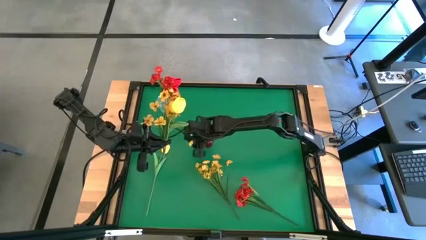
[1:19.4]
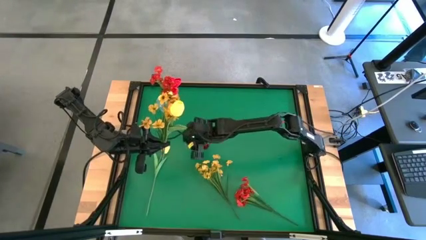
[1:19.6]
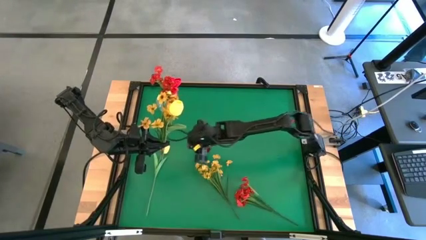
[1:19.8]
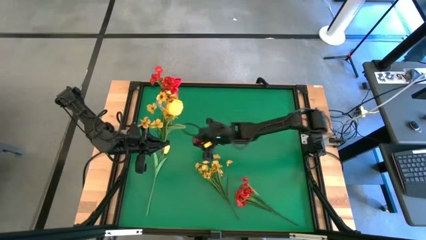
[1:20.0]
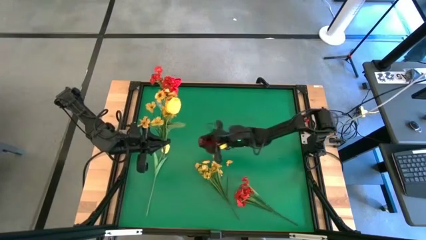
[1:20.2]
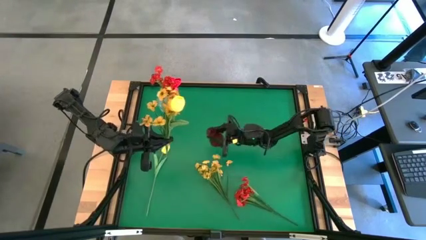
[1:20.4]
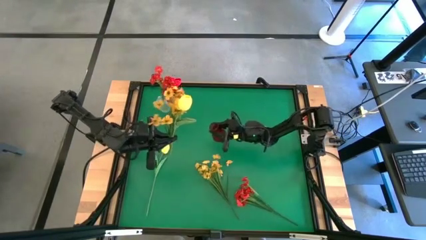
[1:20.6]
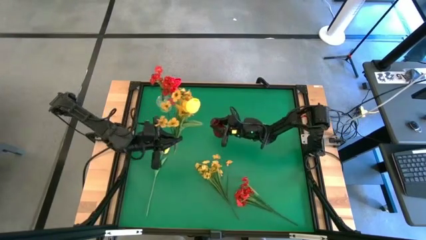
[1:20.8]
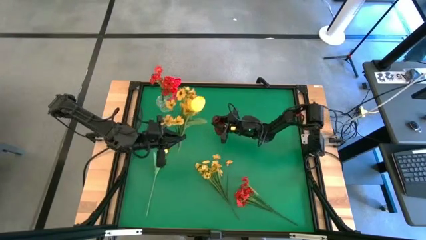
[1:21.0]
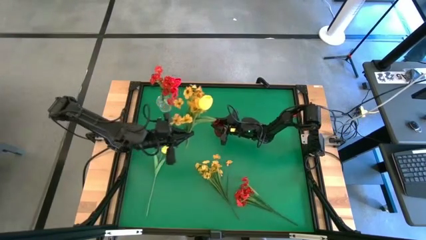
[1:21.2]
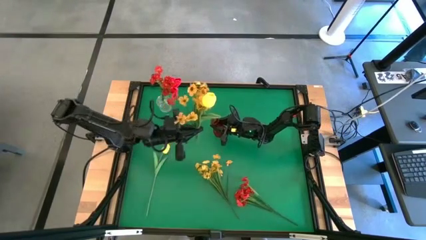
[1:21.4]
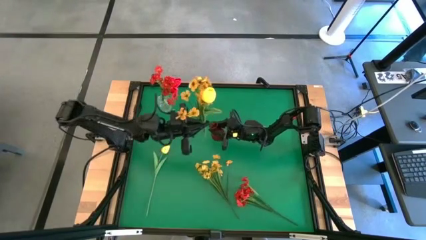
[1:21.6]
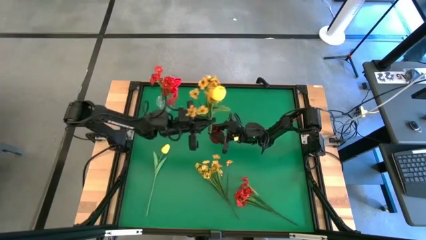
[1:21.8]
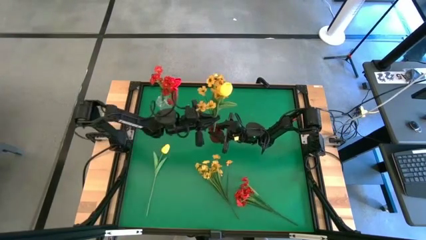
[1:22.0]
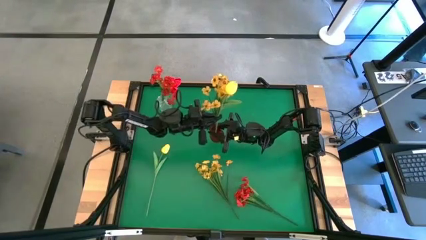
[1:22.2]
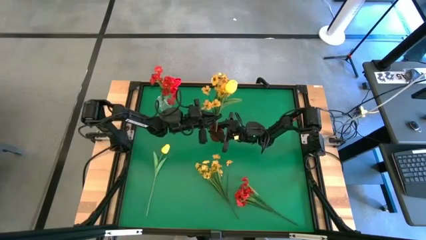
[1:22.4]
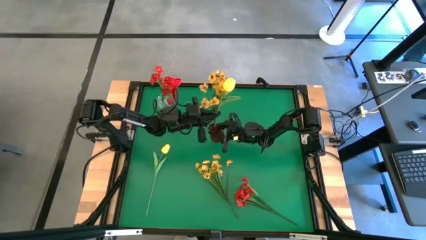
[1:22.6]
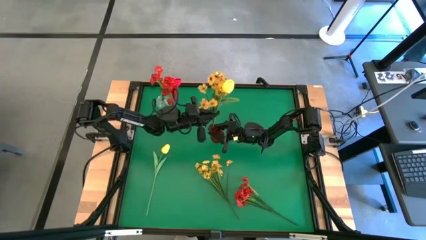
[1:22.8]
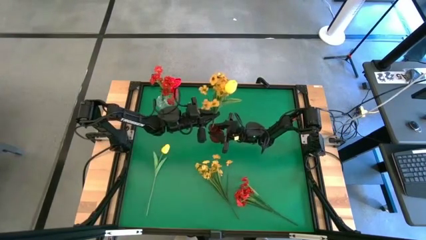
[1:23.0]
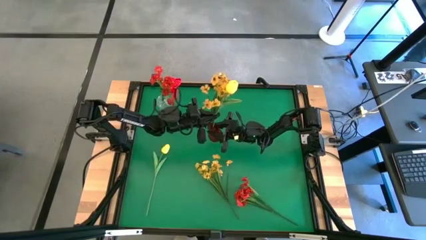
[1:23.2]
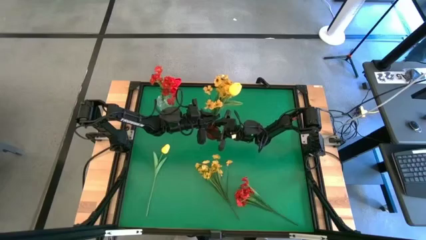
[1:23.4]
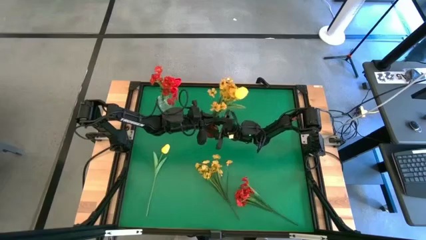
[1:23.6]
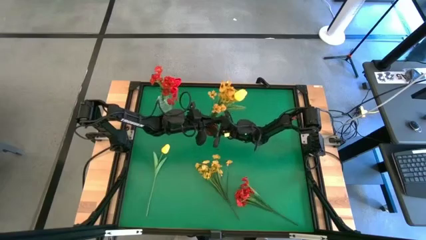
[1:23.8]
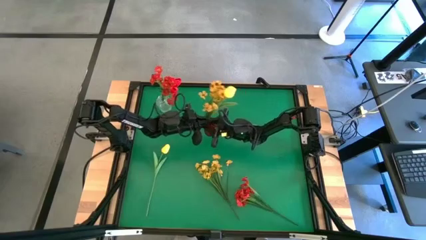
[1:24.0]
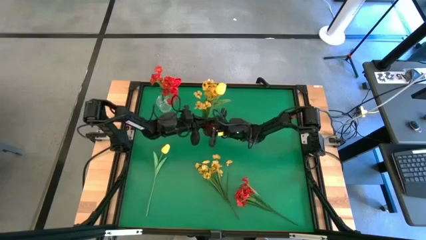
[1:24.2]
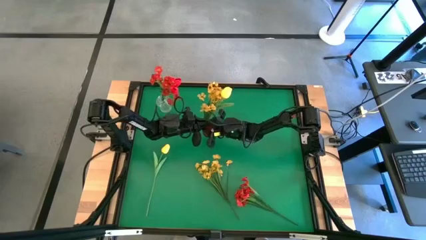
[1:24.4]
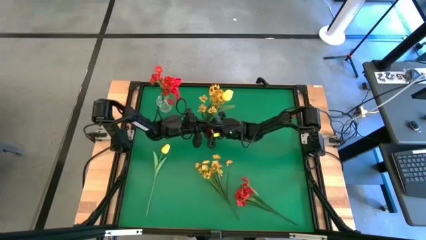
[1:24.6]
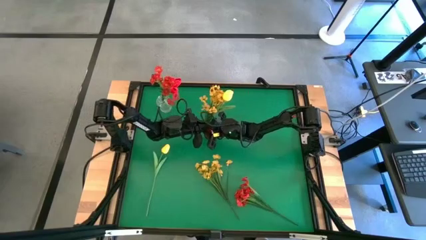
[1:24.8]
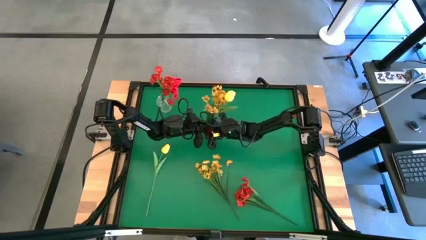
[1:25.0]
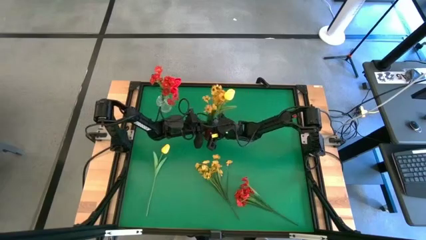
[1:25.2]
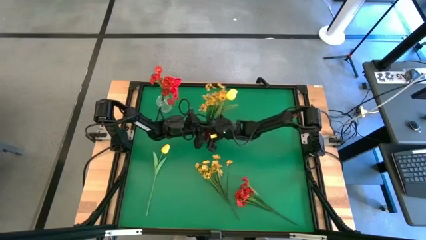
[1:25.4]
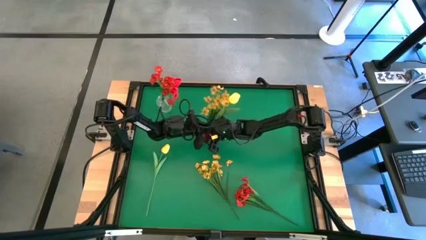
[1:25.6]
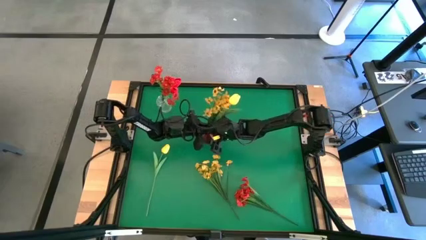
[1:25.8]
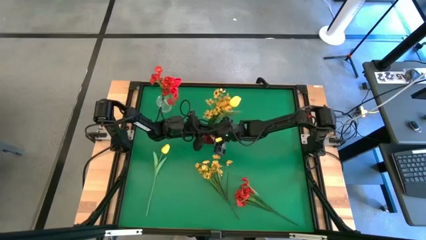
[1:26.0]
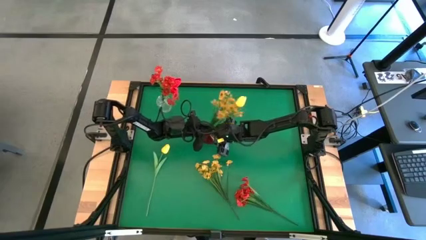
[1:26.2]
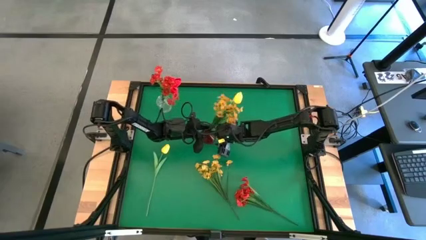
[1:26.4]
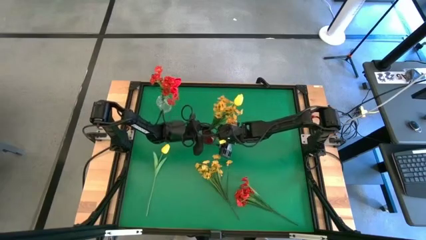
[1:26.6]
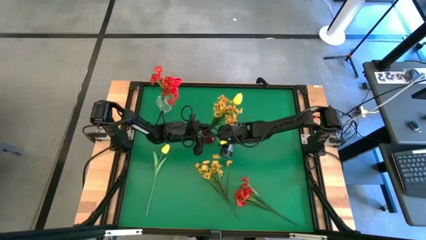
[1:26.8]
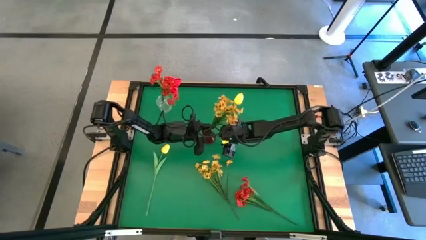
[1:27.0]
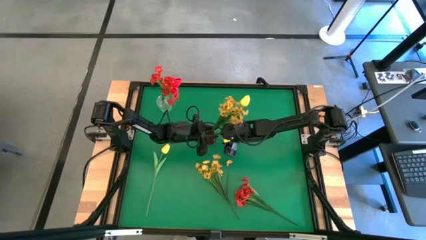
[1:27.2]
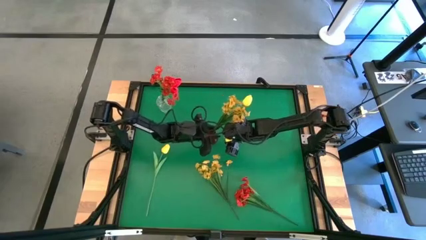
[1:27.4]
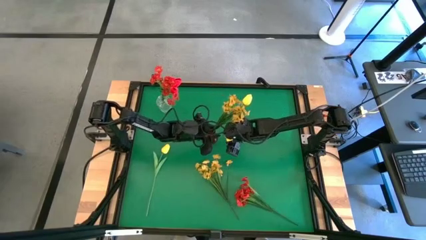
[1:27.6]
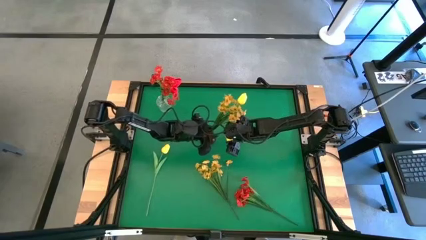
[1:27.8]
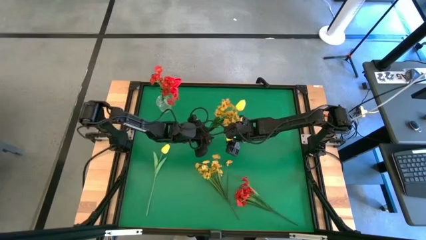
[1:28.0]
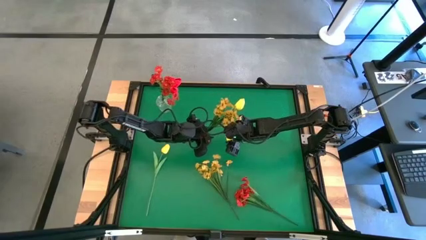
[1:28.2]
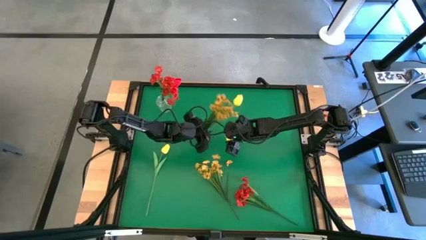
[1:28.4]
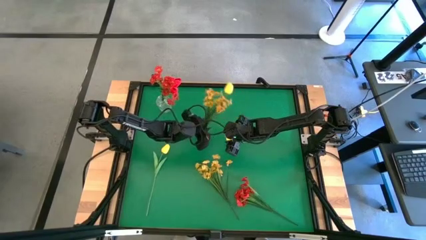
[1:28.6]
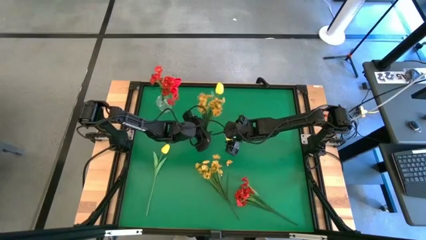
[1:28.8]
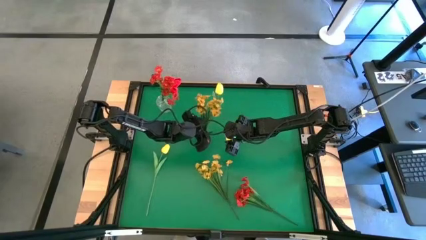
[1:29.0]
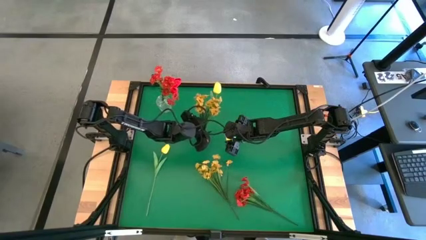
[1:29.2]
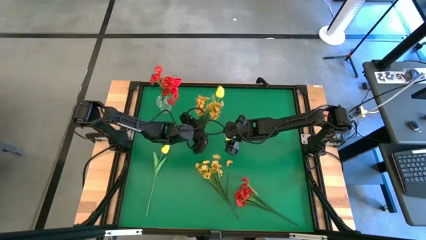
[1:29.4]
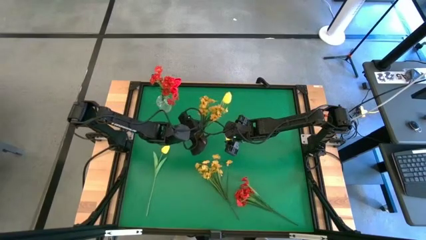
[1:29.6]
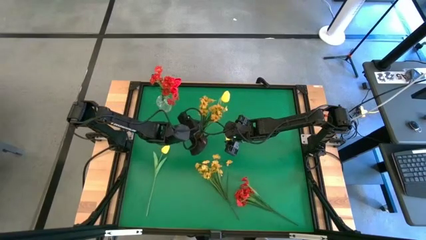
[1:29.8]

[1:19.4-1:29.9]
Task: Sort flowers into vase by color
Put the red vase containing the yellow flowers on the center of the table upright

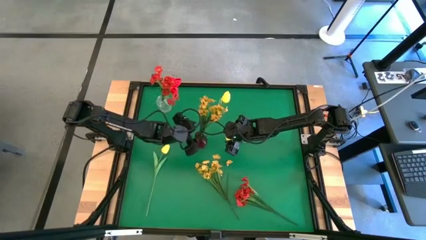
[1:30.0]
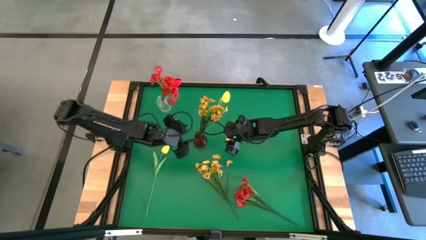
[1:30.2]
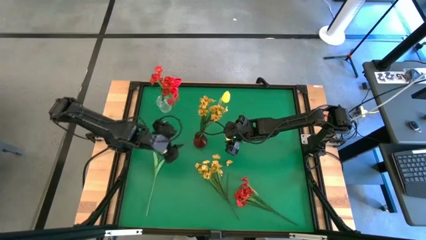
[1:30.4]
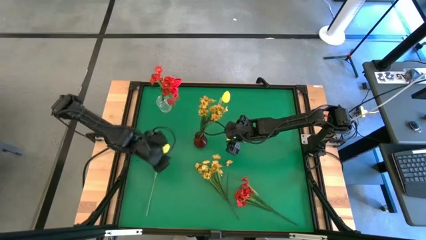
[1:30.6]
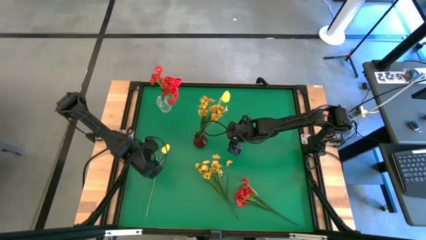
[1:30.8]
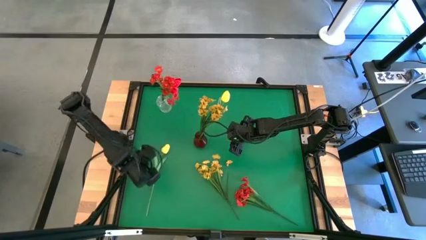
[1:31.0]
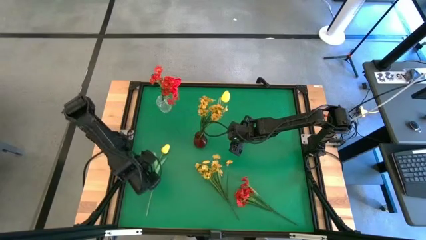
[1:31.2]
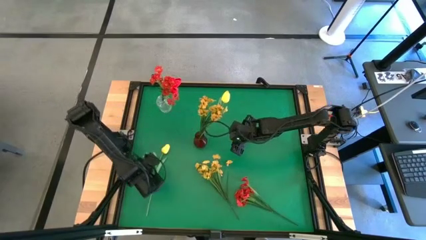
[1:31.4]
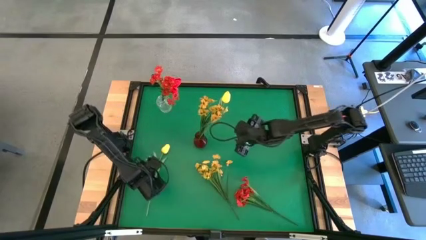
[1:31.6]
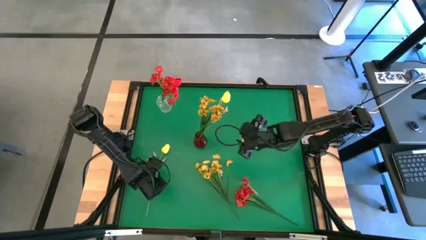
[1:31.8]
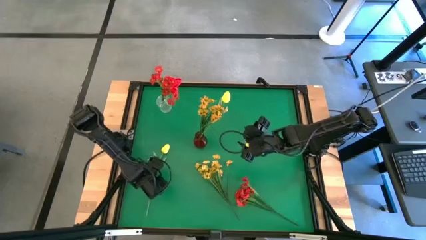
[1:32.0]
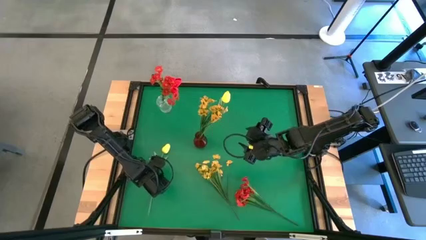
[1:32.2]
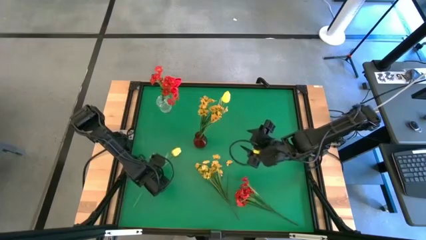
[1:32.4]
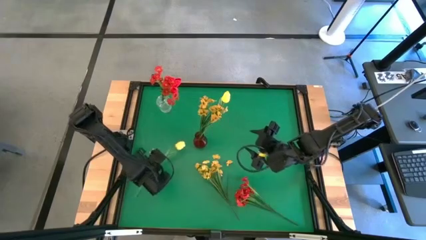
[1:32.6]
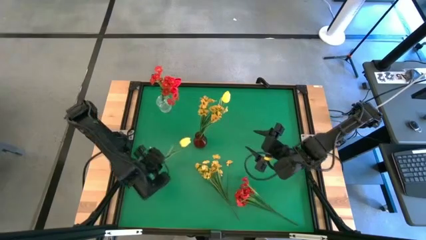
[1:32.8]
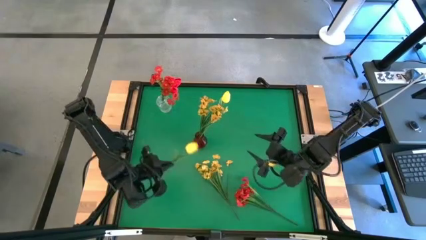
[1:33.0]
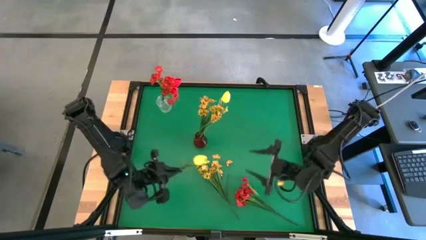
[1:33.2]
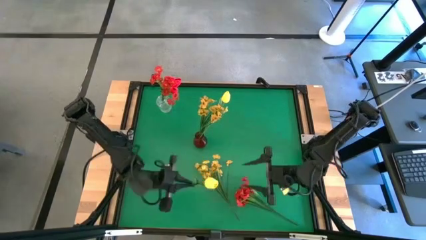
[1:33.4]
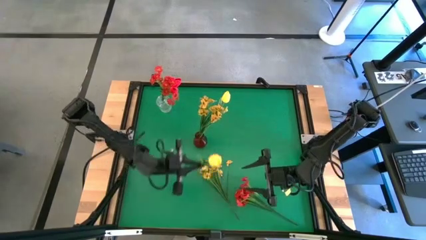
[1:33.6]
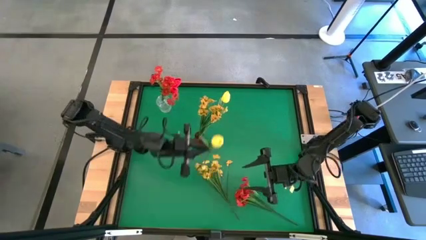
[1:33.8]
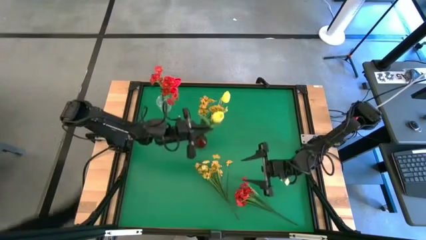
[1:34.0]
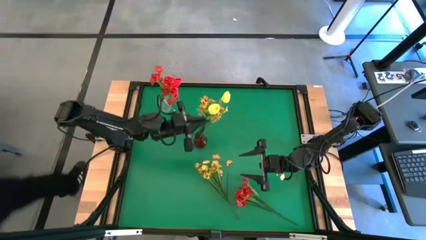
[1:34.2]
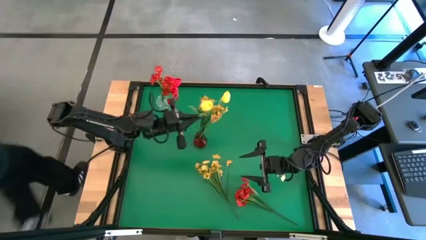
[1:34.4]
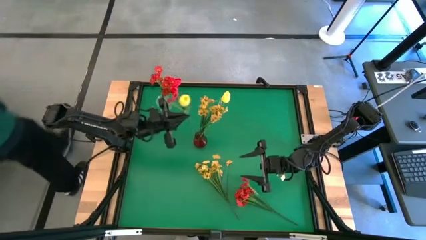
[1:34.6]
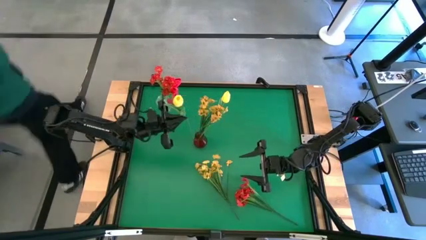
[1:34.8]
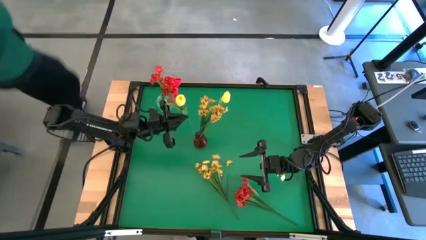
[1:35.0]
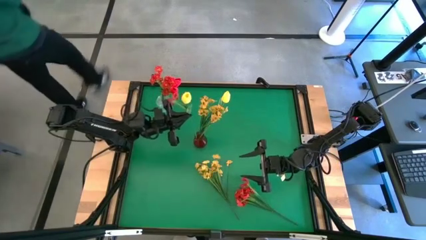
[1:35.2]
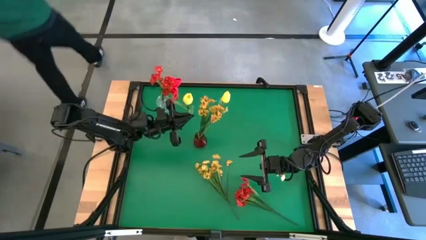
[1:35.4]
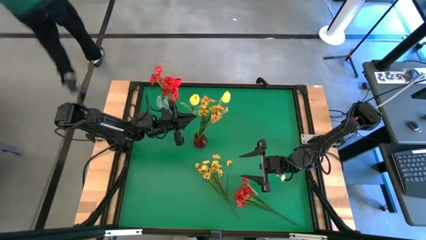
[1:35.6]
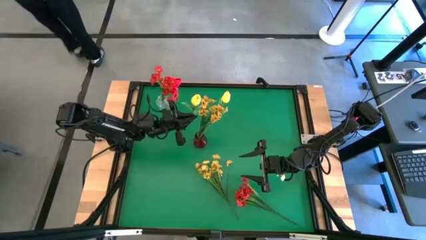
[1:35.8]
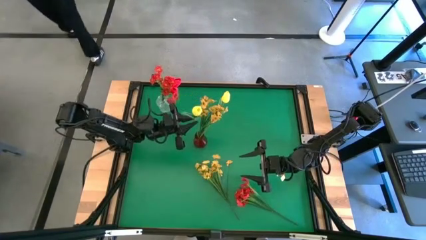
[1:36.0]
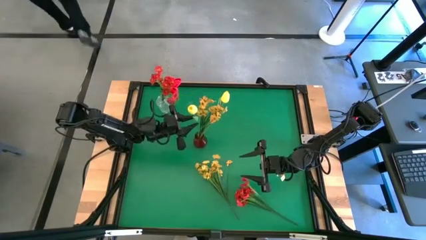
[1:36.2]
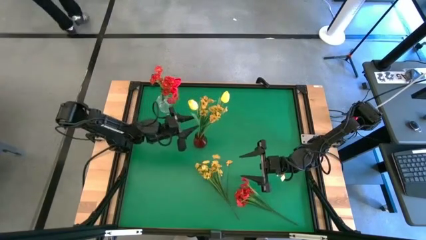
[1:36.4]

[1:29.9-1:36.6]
Put the yellow flower into the red vase

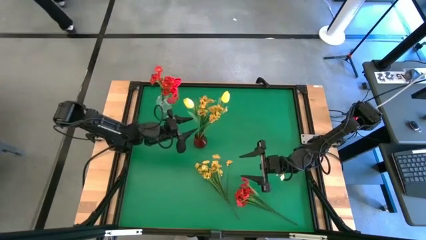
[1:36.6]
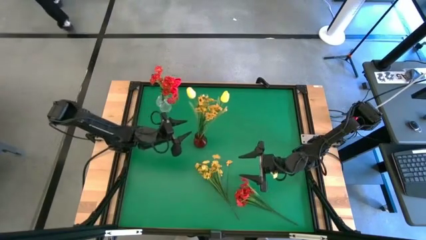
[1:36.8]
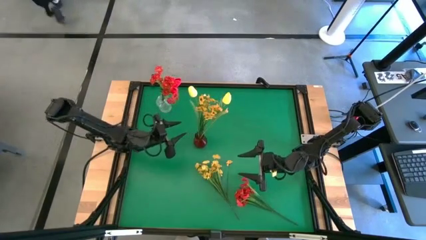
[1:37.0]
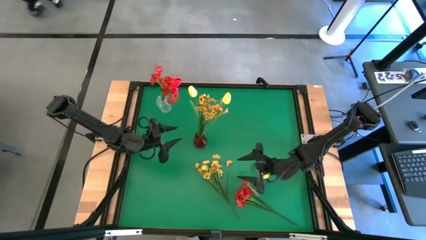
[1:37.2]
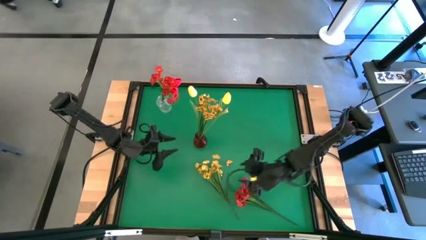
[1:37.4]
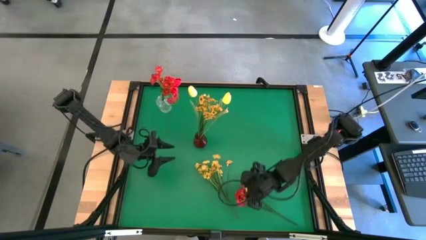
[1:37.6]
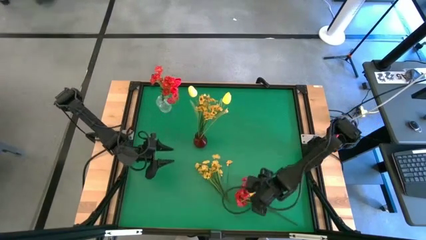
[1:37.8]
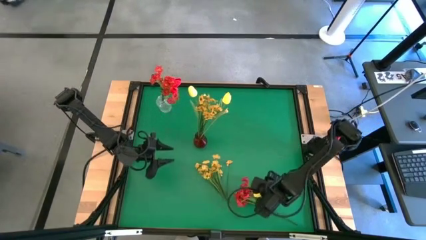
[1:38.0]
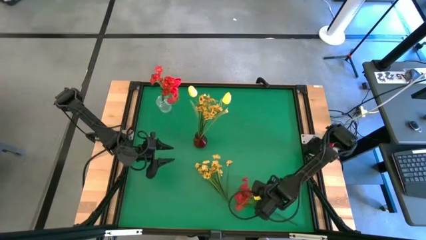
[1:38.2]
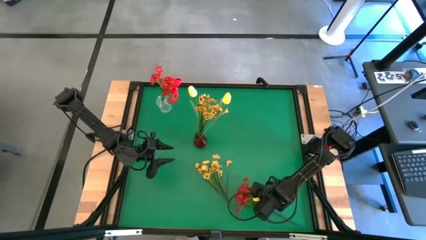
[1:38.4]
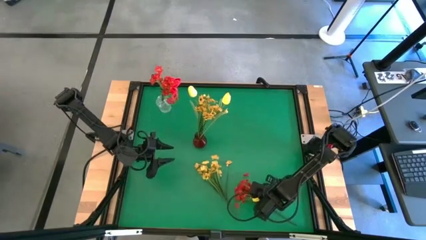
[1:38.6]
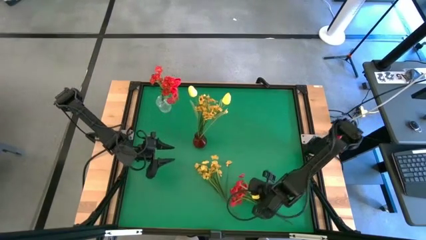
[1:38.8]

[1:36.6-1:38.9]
Put the red flowers into the transparent vase
